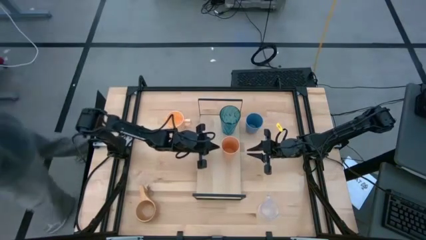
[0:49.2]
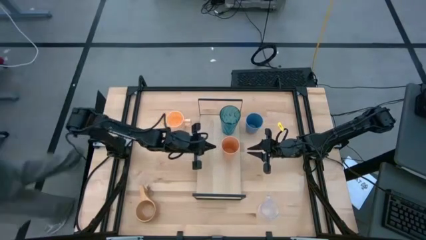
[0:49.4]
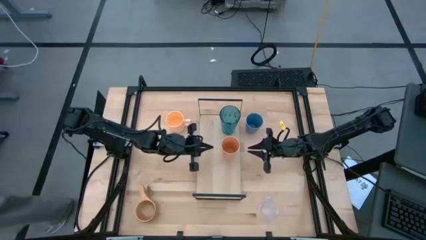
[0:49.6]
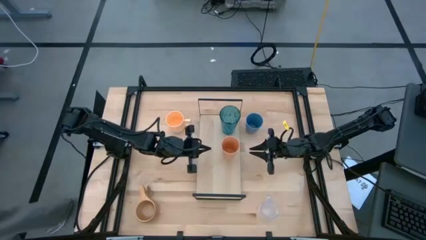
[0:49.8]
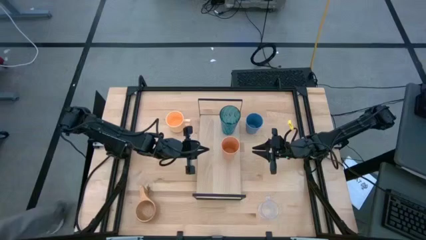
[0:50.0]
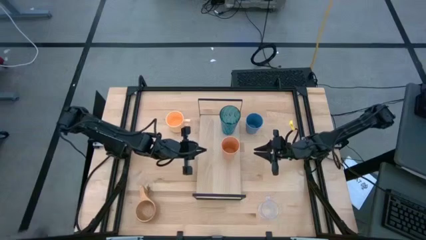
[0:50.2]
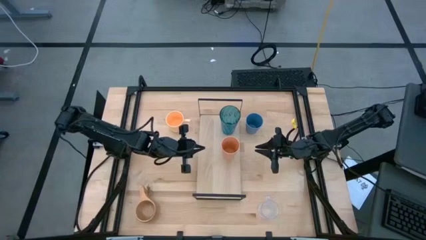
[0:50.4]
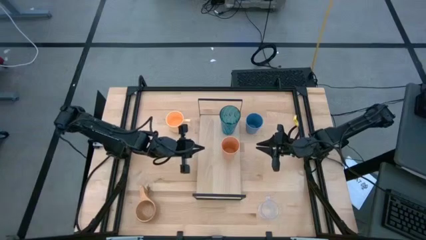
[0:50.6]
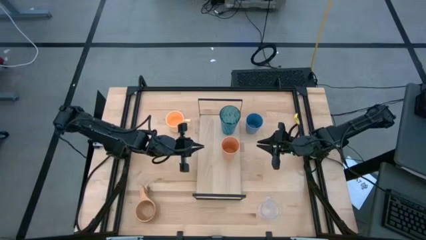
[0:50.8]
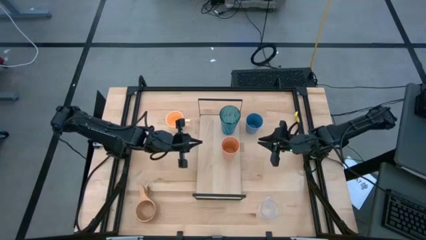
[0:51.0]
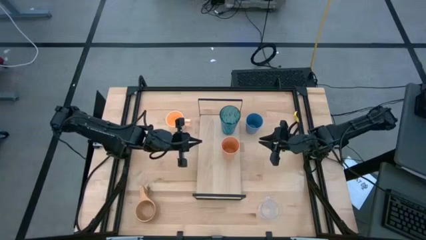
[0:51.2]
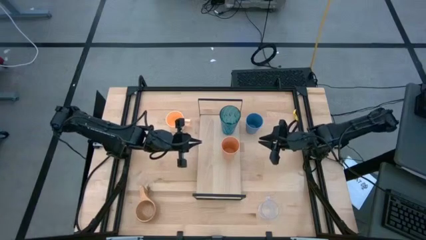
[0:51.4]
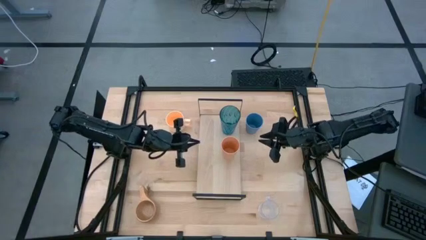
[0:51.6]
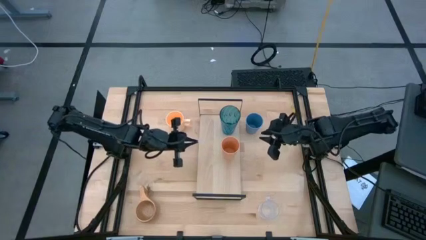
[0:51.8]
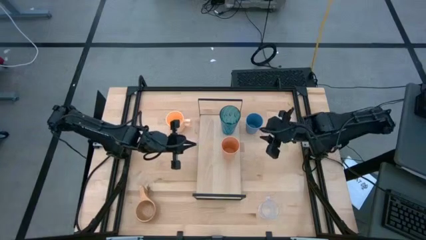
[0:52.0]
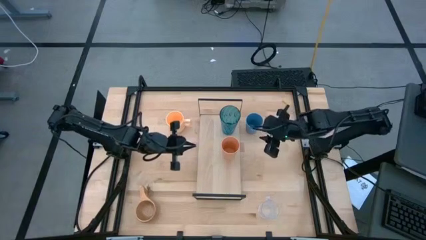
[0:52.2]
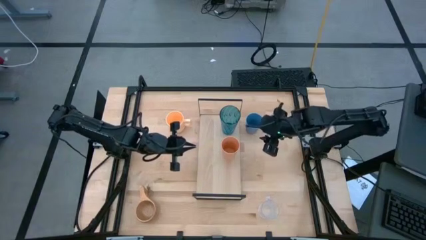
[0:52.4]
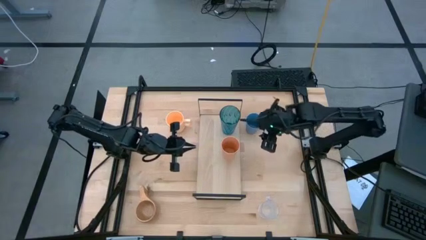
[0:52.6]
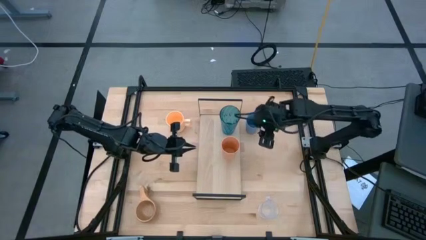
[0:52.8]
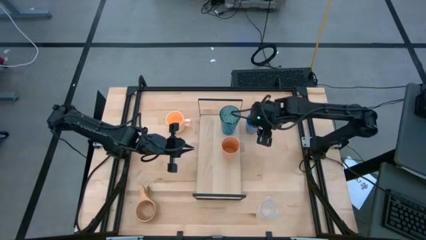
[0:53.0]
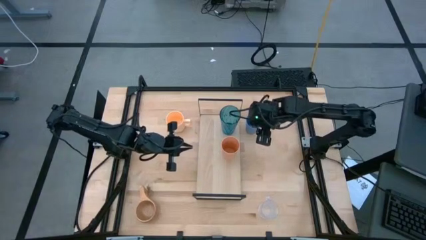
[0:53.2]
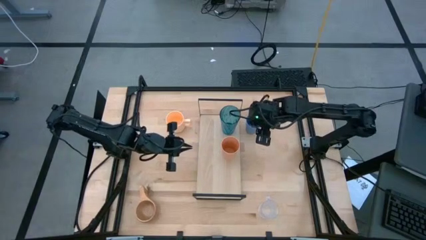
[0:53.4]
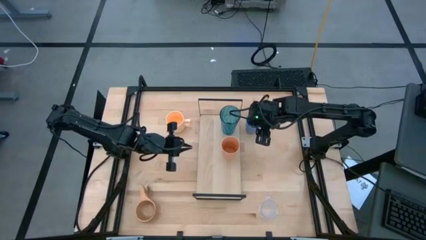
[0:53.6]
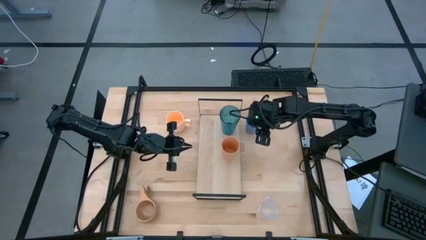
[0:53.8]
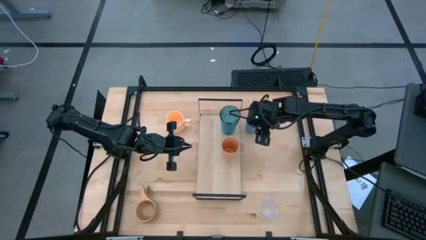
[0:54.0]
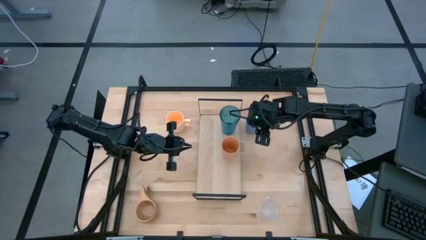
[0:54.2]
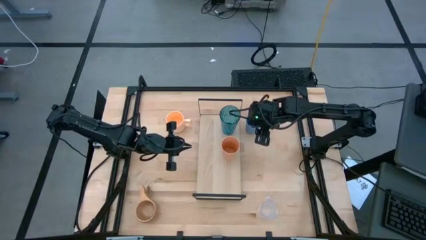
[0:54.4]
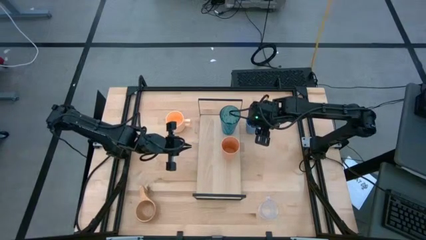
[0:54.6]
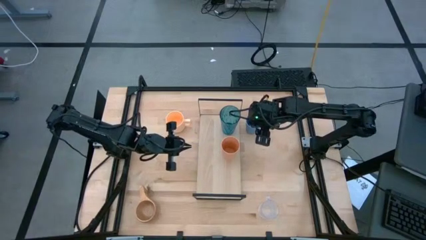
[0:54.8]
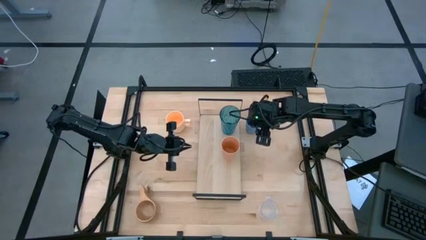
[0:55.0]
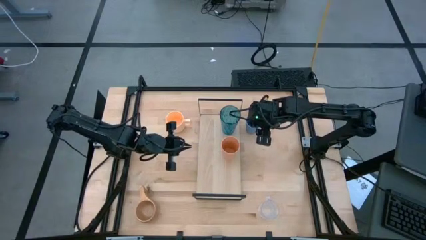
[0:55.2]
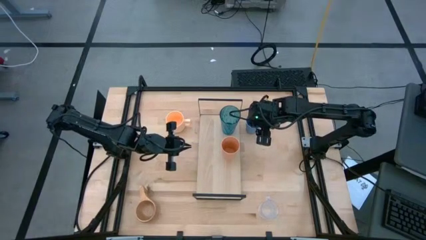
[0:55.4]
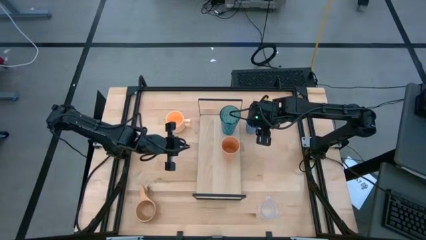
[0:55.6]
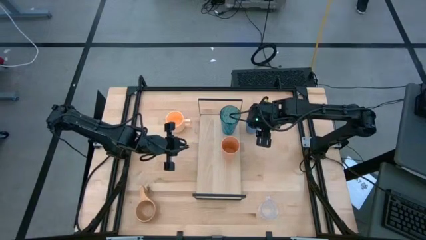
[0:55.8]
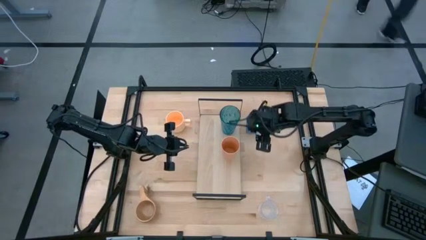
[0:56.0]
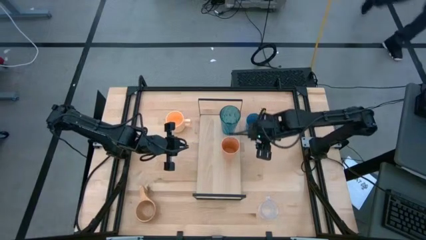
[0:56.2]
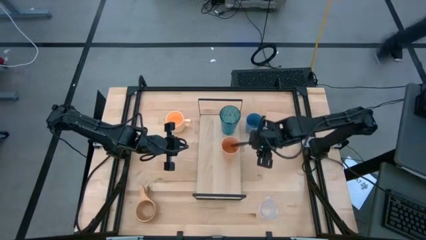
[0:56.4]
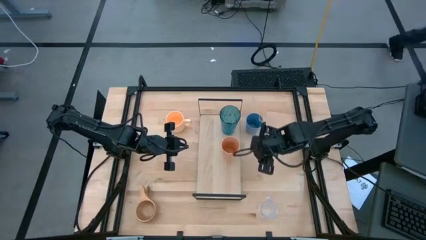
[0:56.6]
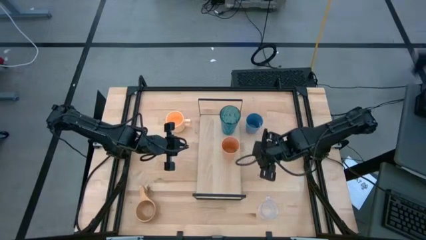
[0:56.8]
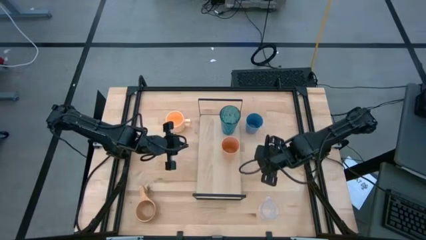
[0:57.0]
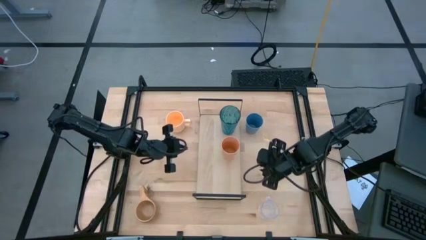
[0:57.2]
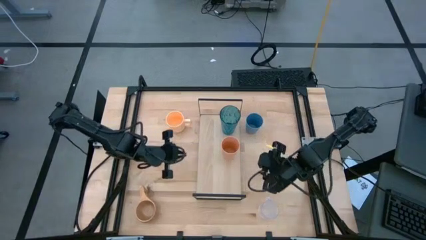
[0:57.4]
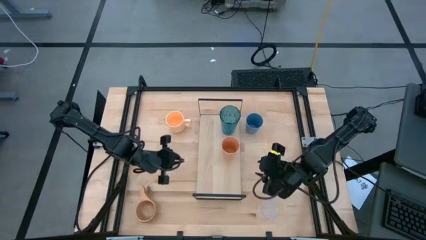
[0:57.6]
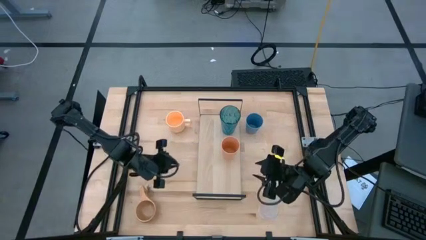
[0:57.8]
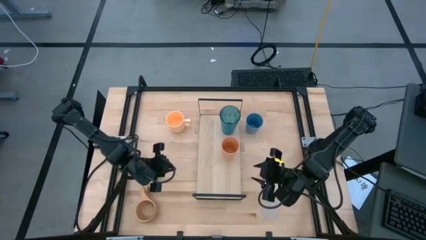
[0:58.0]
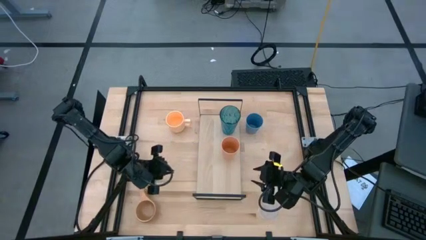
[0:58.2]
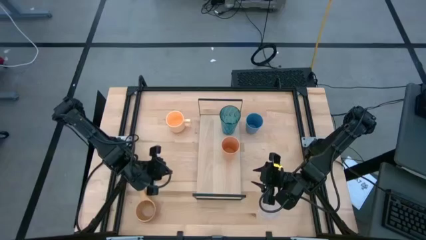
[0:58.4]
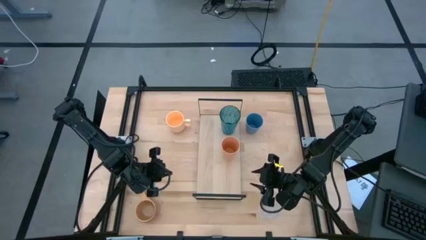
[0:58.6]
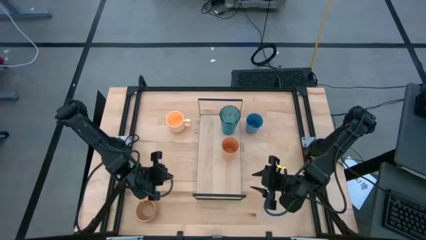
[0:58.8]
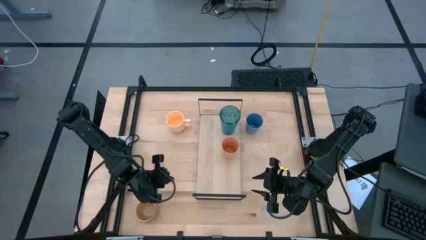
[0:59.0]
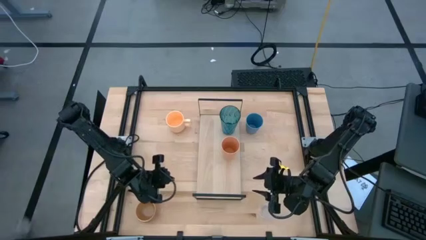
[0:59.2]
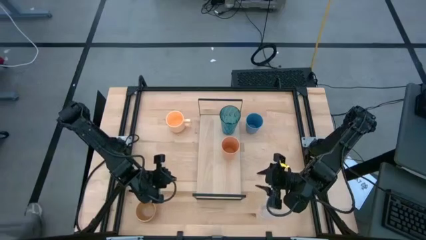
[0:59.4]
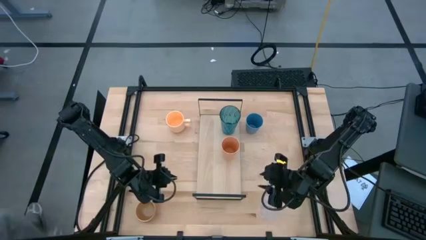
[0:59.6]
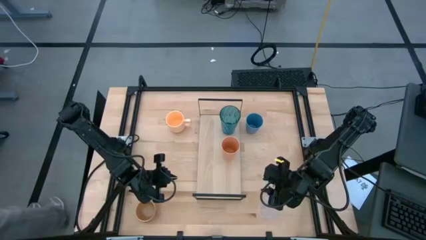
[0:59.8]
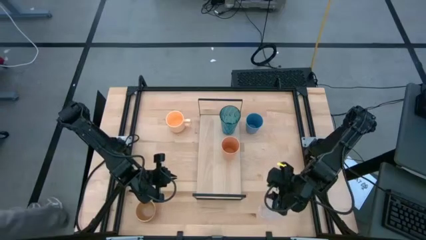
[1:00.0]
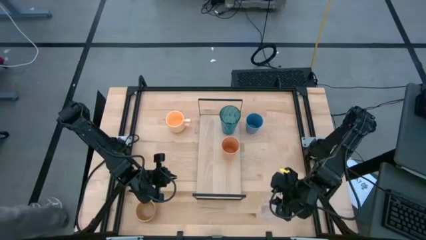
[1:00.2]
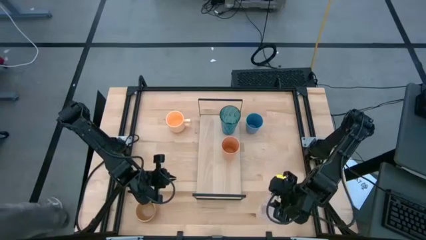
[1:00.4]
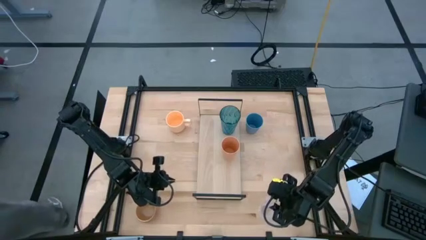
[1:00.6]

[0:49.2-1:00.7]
Task: Stack small to large cups/mugs on shelf
Put the blue cup on the shelf
